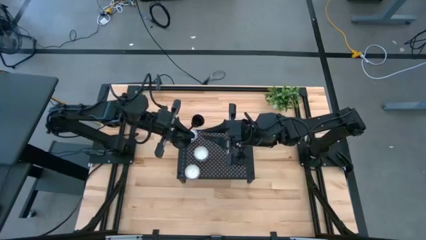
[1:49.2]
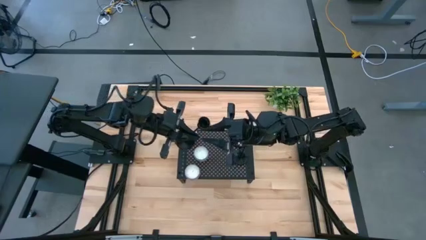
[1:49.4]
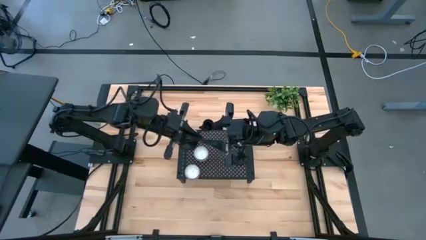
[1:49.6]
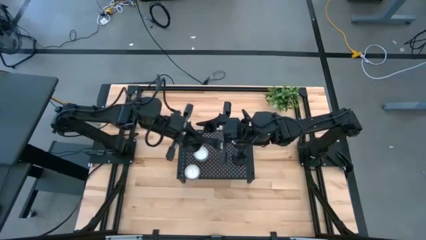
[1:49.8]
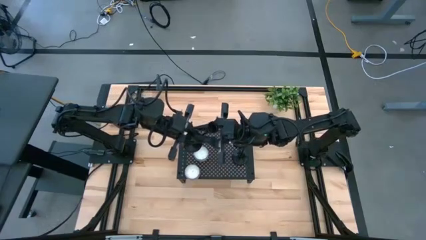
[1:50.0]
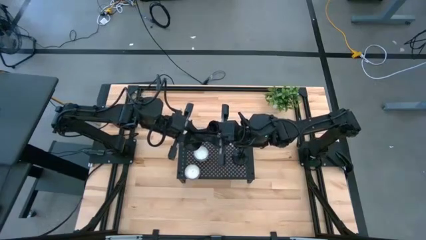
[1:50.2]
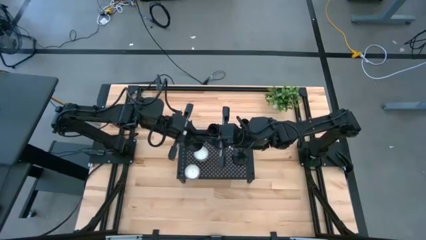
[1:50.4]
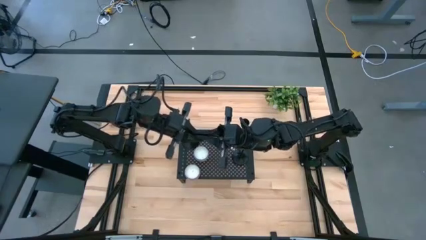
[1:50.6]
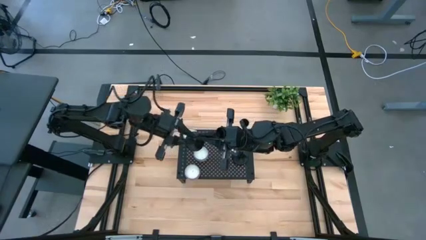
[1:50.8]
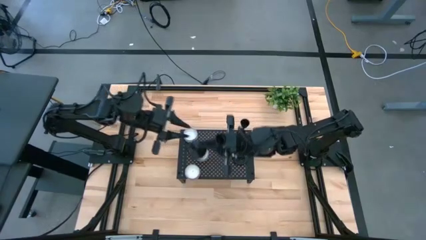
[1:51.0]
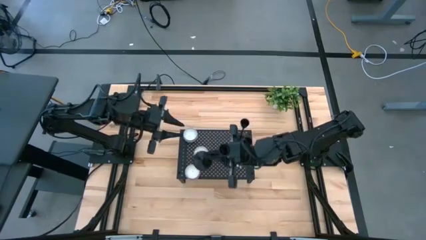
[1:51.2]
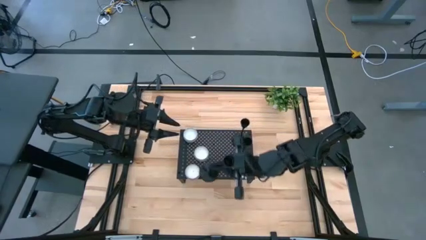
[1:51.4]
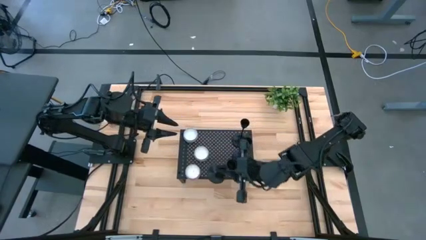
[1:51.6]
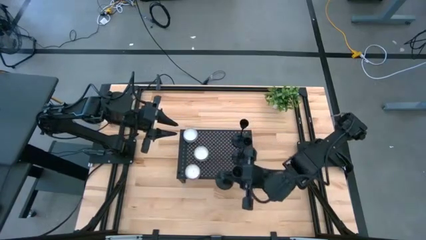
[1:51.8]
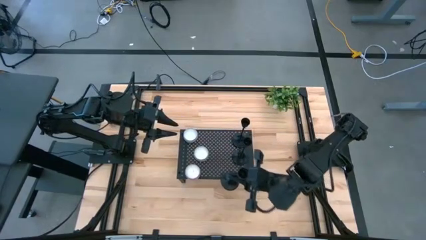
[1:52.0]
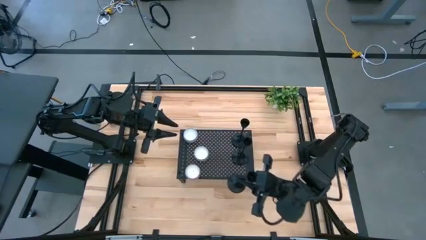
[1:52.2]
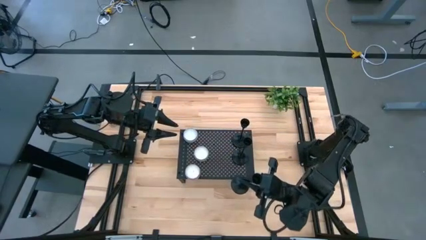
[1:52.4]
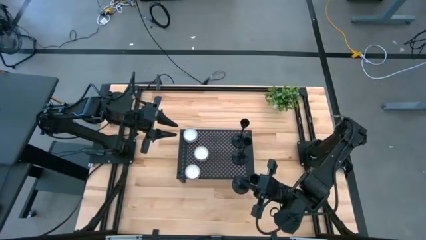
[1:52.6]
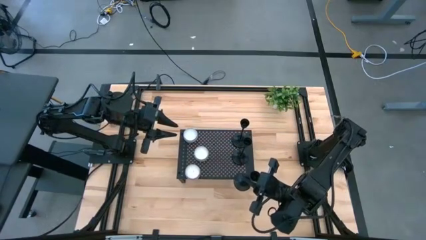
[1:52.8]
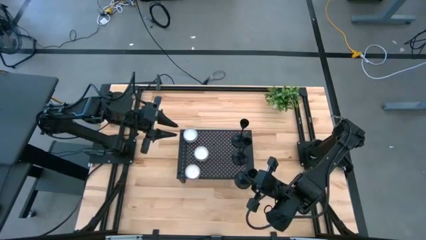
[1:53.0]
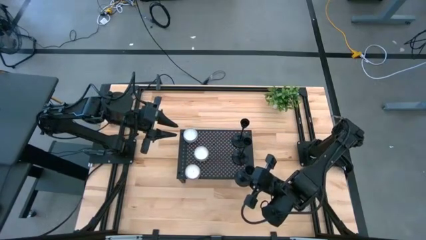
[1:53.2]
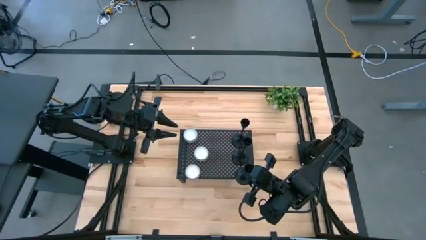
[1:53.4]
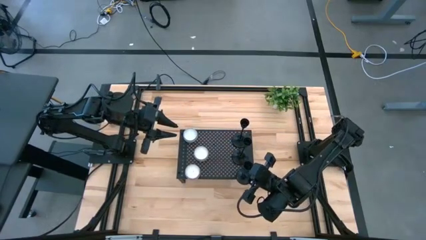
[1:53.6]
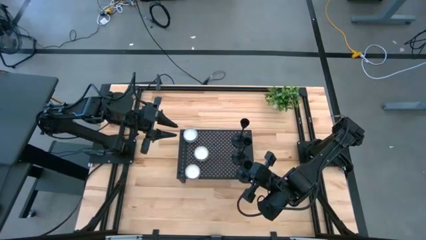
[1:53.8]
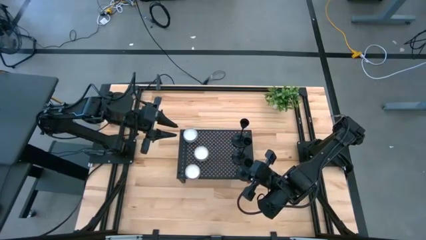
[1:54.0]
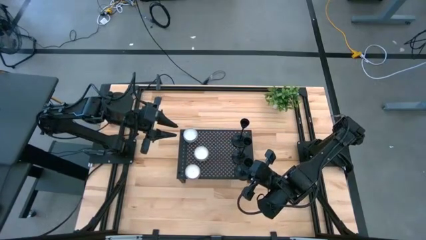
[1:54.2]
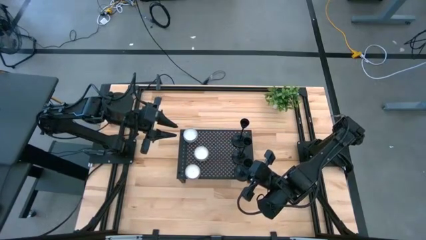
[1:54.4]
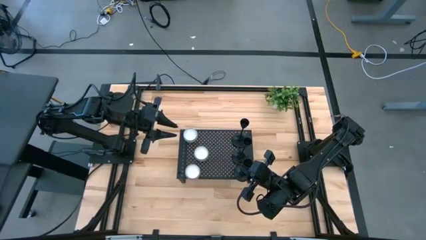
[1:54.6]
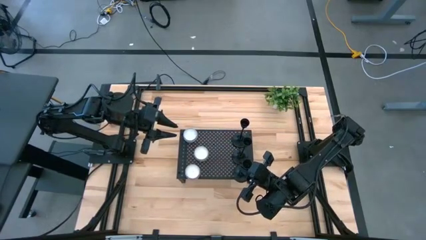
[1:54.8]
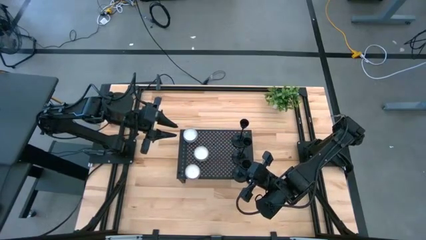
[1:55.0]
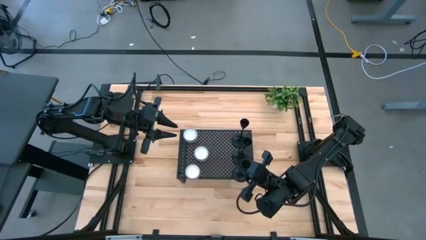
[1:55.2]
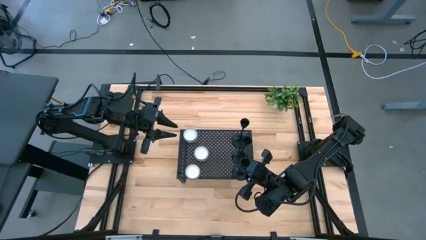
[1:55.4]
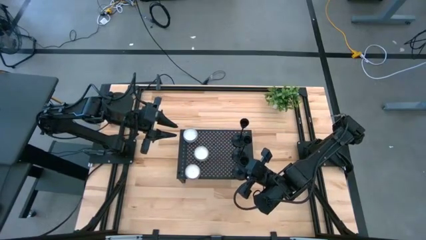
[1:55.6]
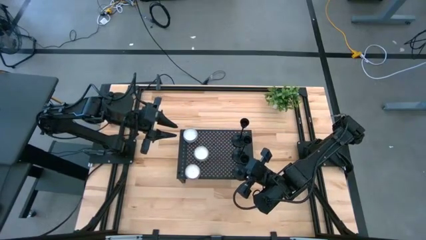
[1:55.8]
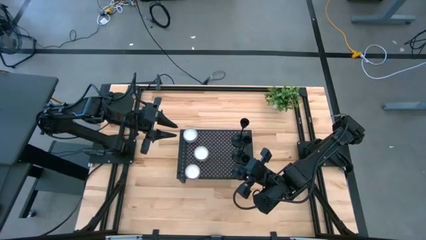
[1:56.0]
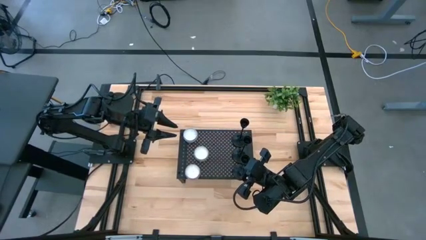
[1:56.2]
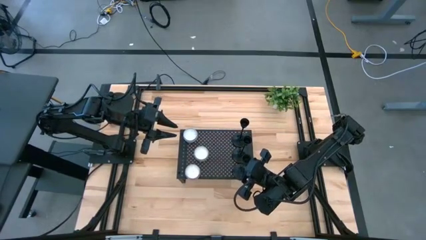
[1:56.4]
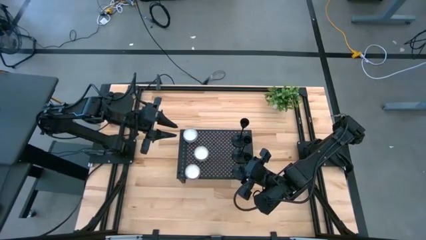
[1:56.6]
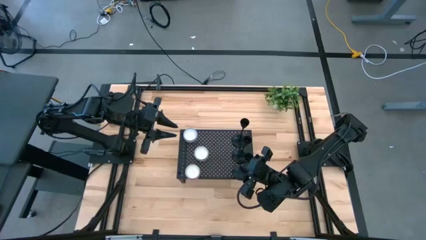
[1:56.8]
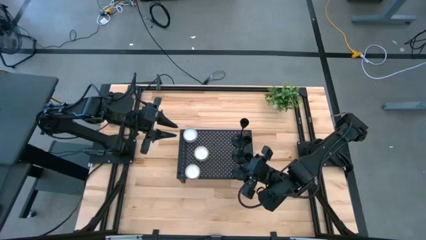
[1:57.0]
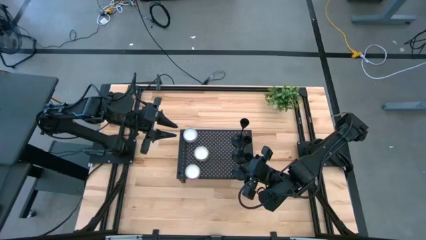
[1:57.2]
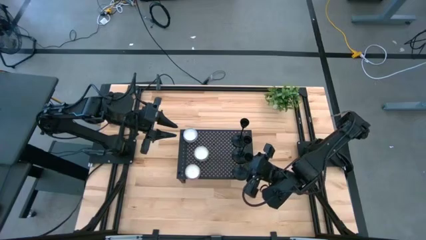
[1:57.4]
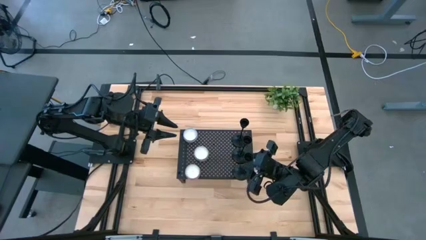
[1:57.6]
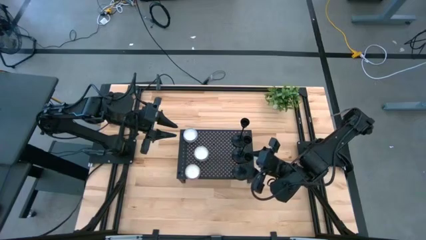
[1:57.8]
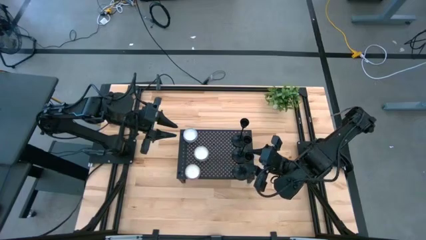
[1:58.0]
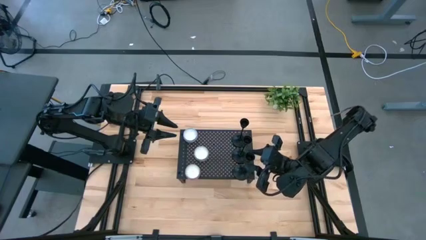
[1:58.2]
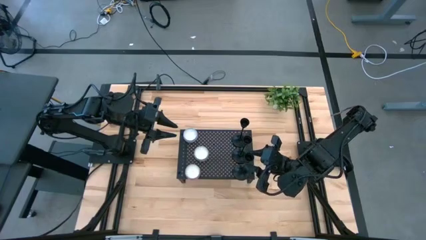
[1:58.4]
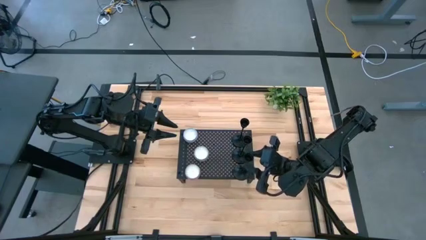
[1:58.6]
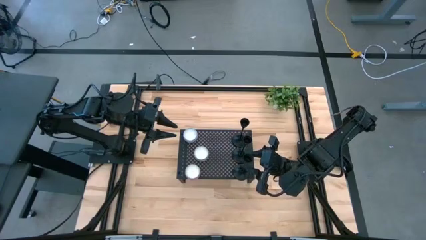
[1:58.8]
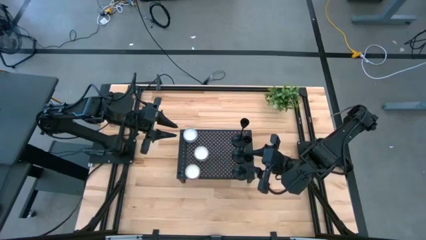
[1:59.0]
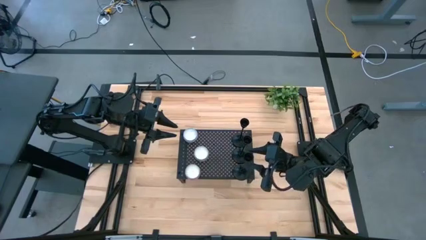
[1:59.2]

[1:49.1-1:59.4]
Task: Pick & Place candle stick holders
Put the black candle holder on the shelf aligned with the other black candle holders

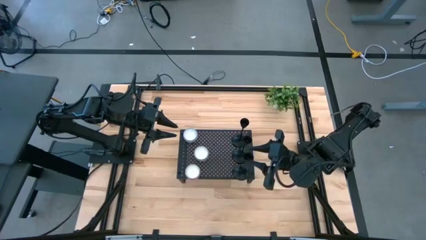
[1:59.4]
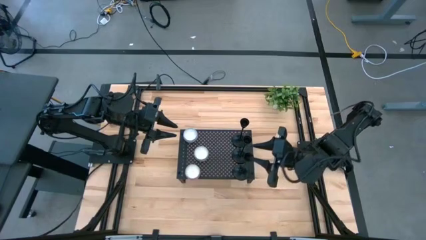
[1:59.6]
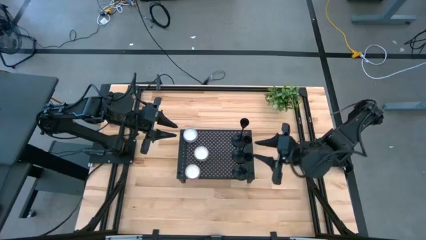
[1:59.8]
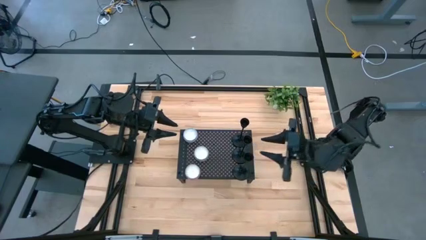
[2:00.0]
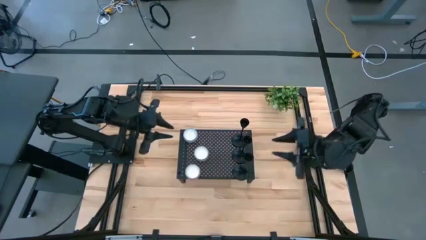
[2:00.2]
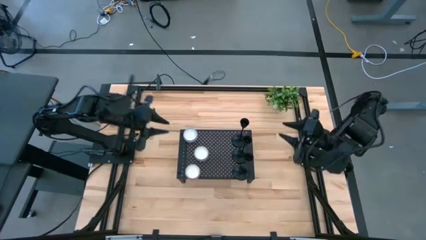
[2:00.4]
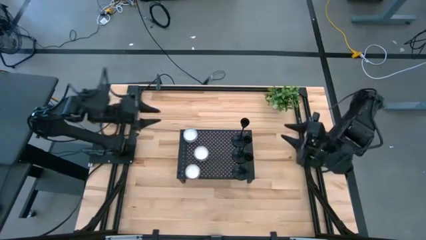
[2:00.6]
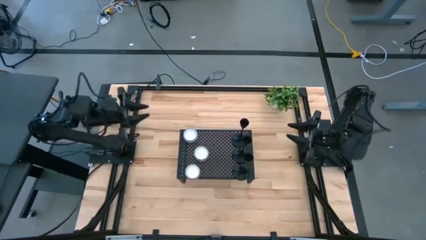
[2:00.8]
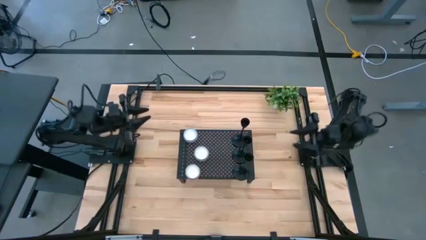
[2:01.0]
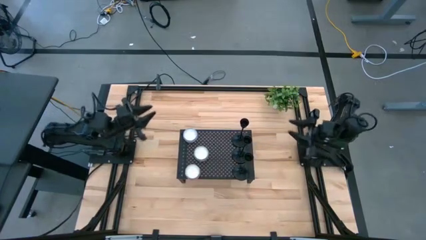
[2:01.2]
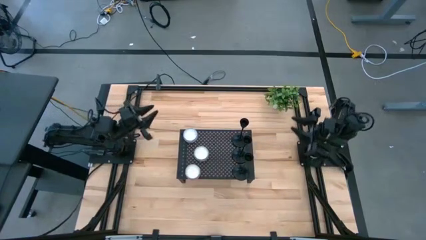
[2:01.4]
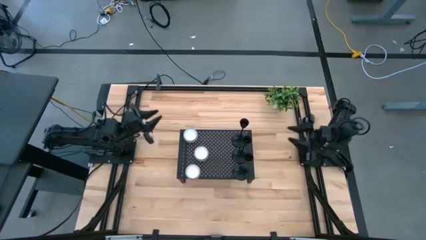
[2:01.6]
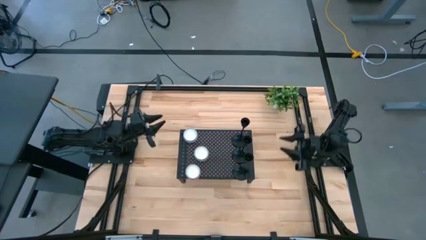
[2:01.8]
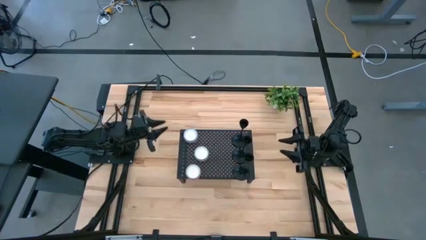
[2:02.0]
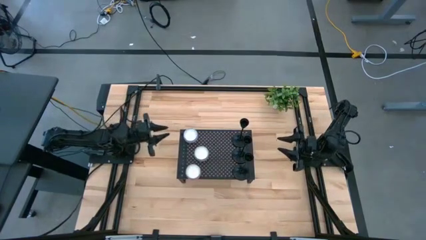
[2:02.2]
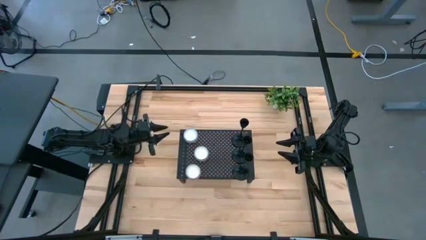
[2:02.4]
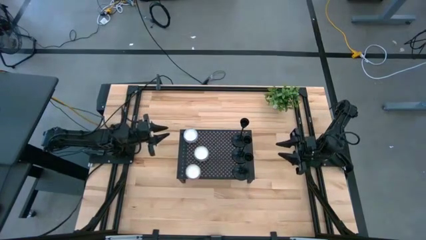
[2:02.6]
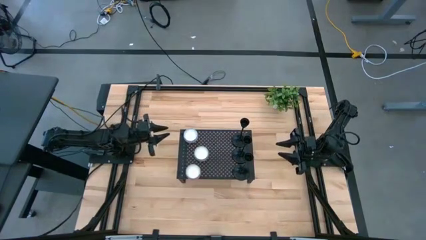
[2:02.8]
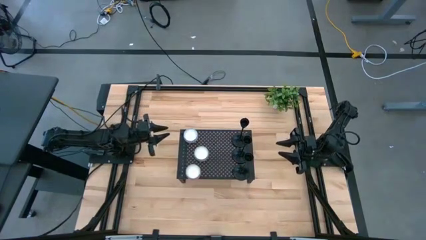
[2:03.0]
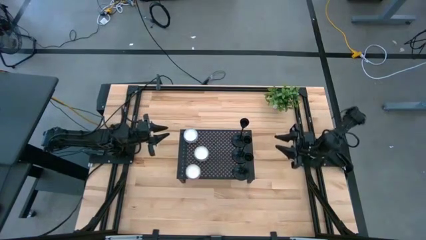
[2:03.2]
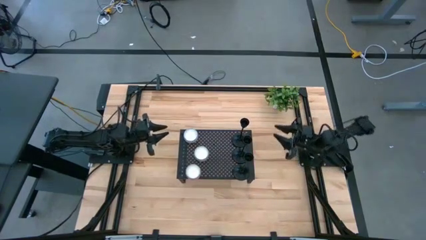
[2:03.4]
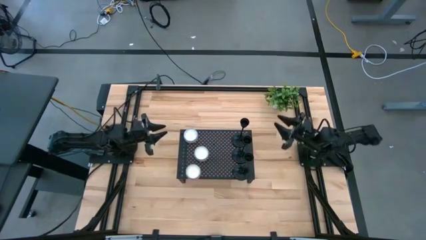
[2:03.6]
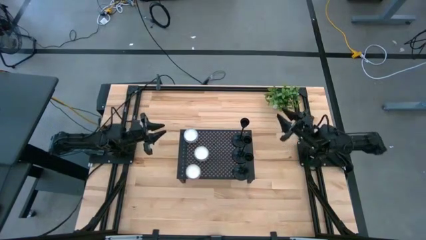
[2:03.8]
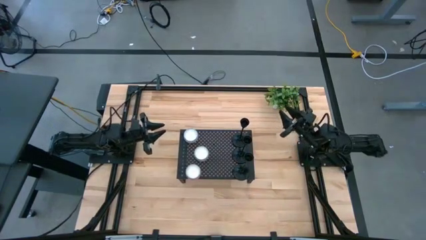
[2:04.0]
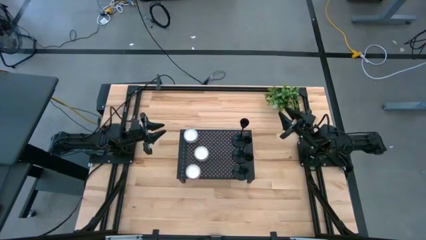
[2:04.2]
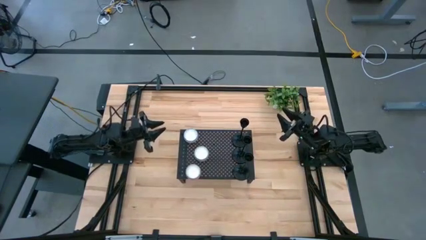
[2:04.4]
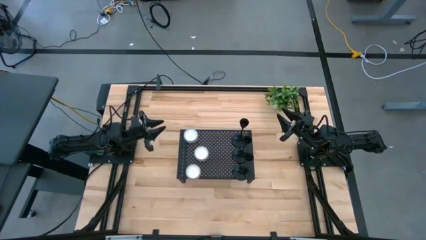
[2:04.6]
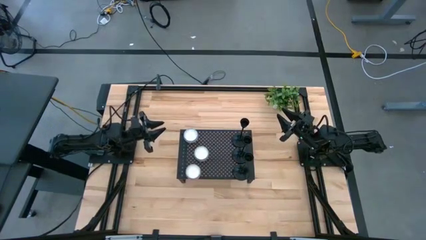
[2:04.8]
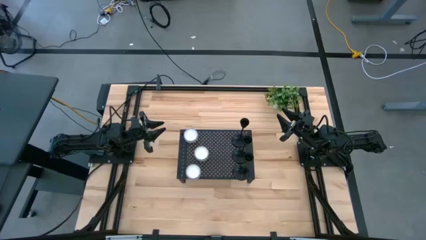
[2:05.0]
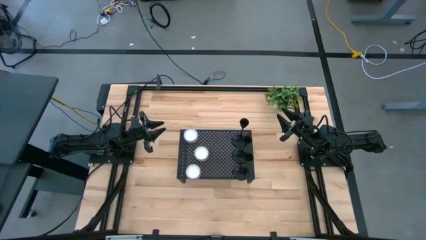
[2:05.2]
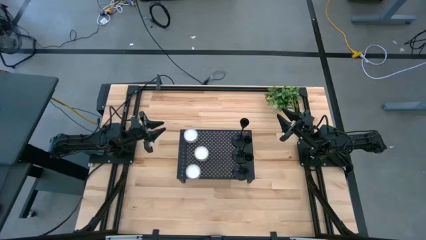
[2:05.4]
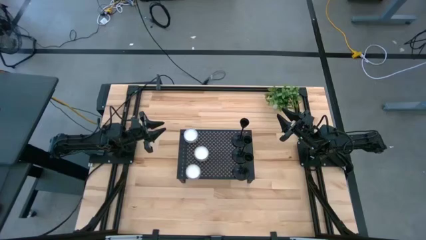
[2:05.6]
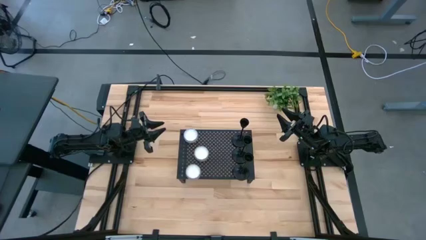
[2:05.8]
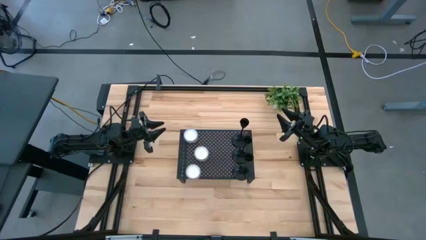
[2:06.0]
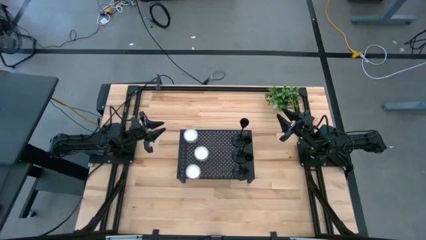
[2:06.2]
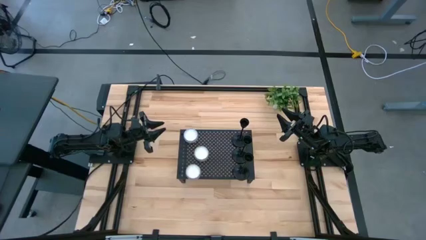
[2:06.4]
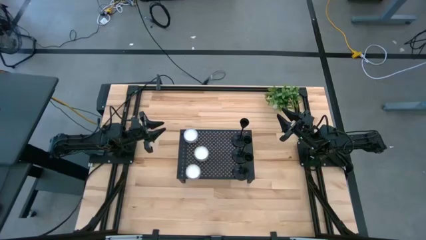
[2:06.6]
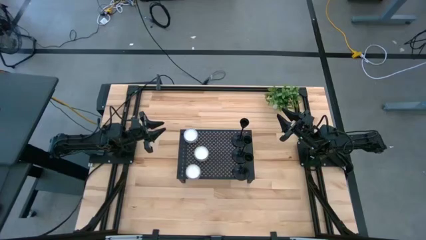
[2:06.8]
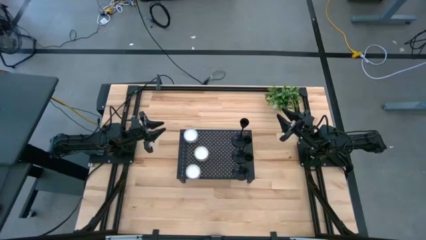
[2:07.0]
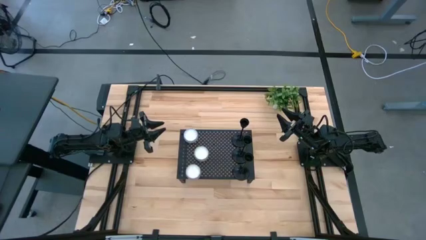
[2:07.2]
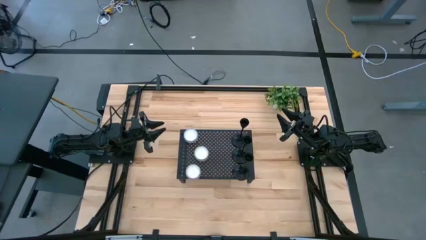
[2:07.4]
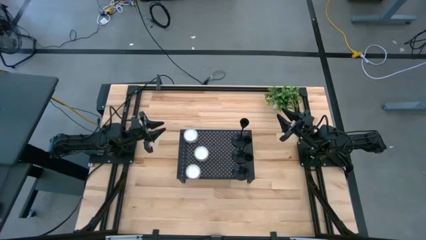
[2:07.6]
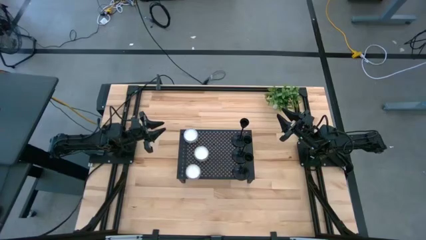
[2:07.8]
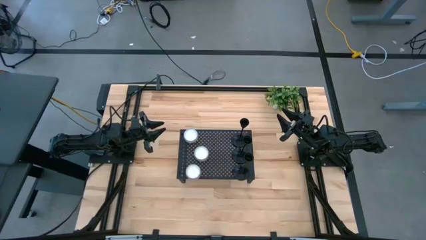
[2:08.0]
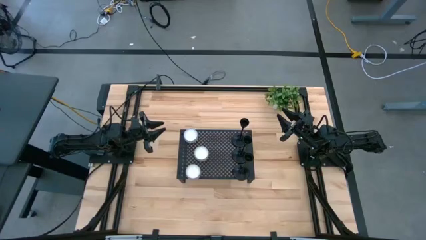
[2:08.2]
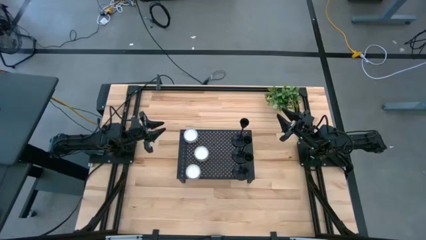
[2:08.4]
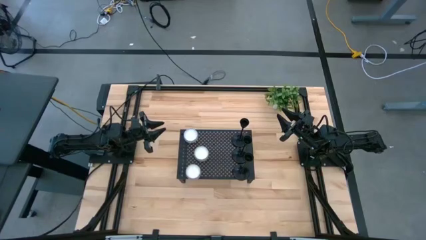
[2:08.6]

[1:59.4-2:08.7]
Return to Home Position
